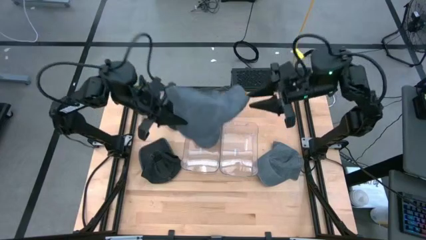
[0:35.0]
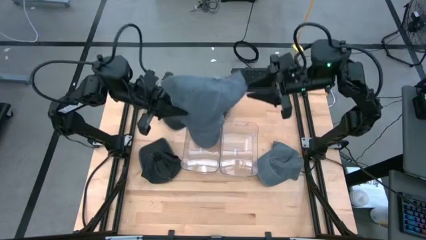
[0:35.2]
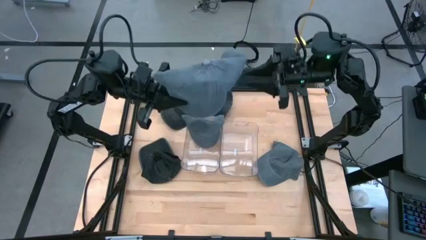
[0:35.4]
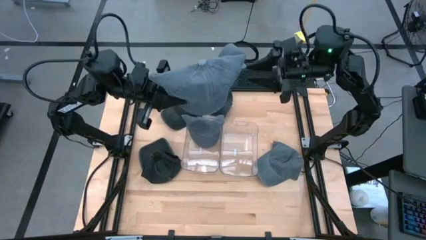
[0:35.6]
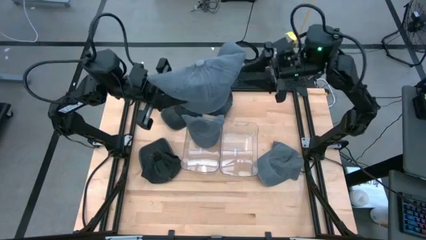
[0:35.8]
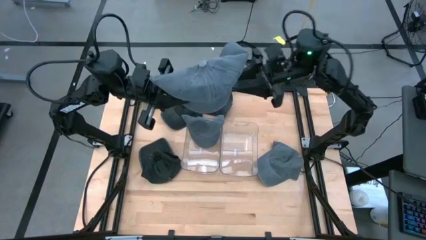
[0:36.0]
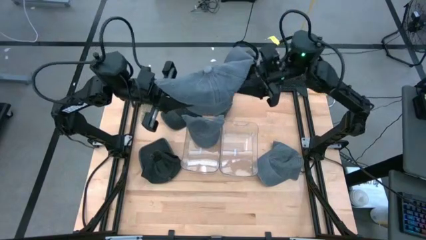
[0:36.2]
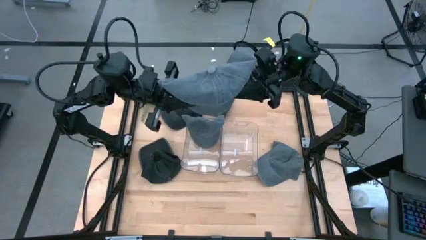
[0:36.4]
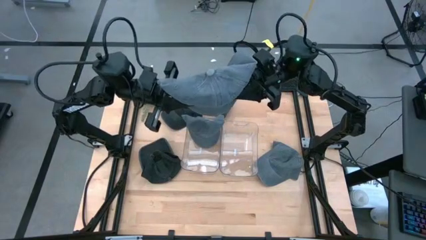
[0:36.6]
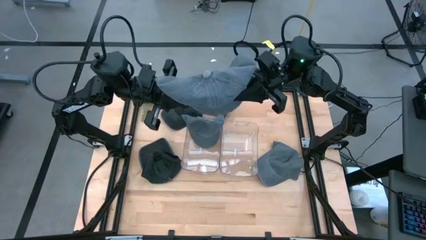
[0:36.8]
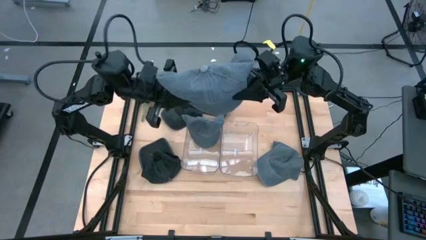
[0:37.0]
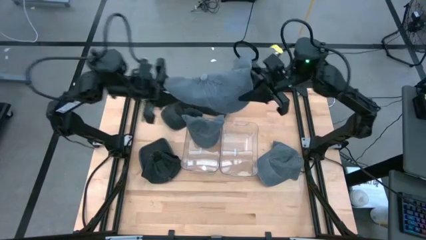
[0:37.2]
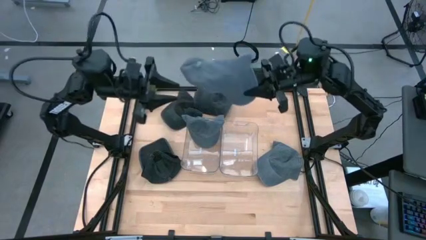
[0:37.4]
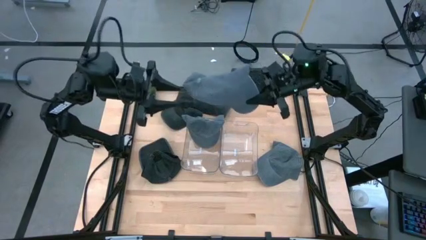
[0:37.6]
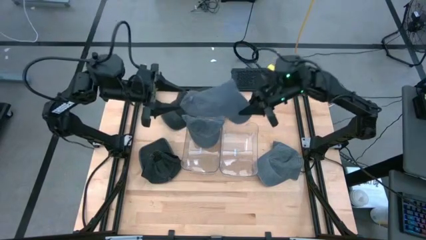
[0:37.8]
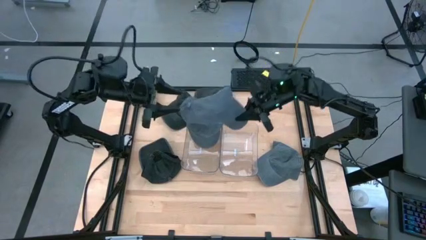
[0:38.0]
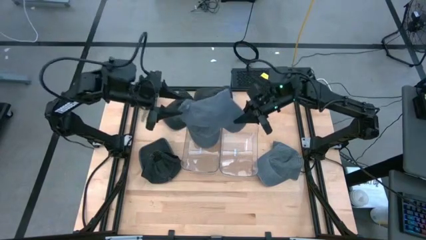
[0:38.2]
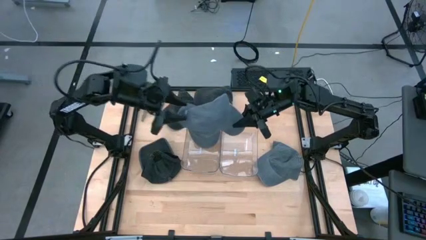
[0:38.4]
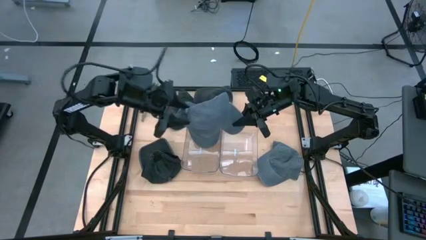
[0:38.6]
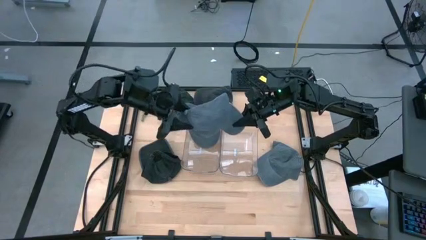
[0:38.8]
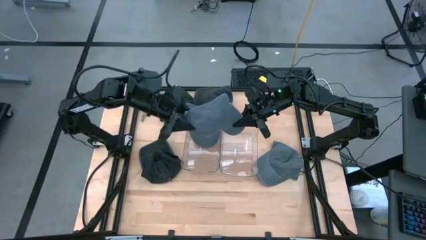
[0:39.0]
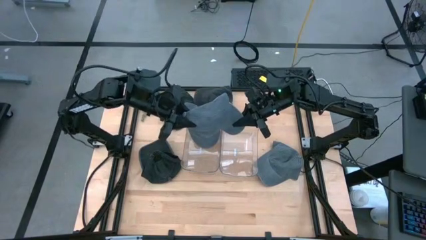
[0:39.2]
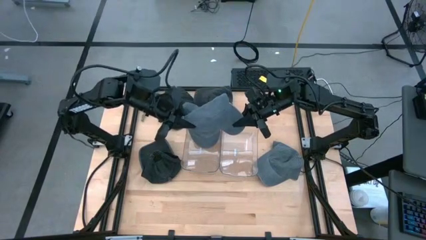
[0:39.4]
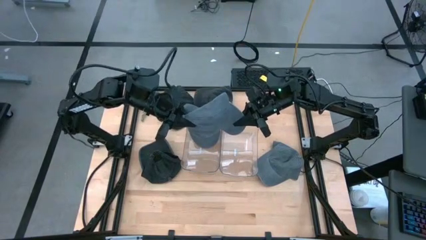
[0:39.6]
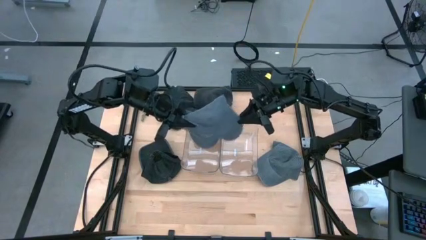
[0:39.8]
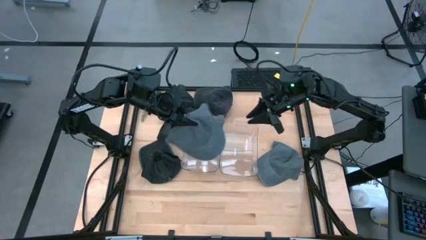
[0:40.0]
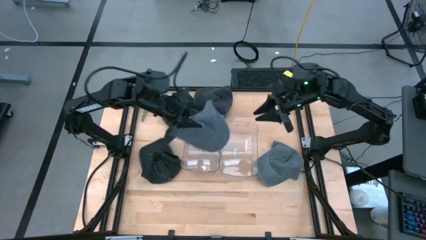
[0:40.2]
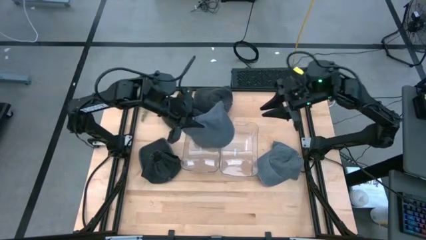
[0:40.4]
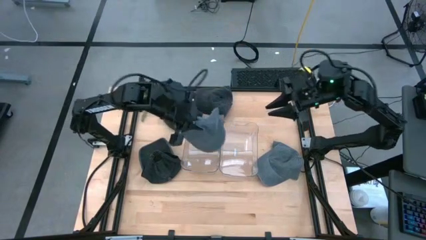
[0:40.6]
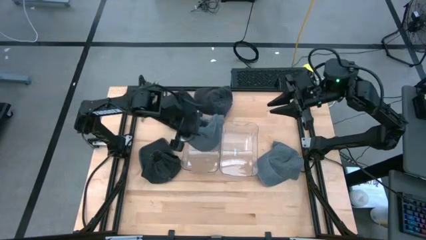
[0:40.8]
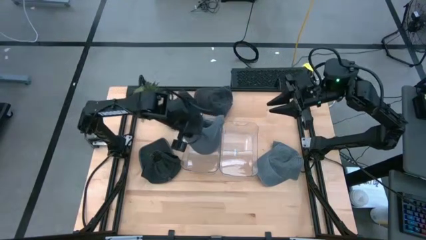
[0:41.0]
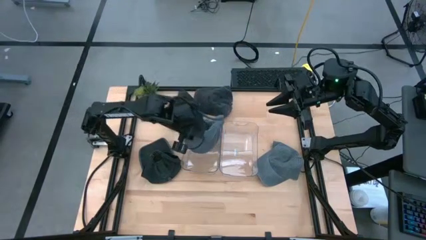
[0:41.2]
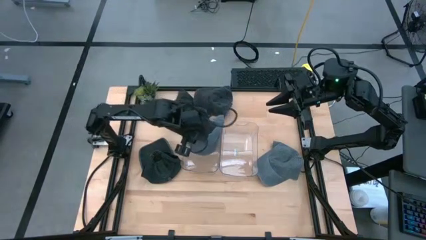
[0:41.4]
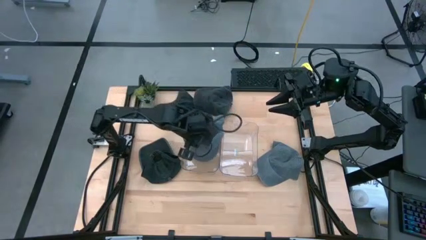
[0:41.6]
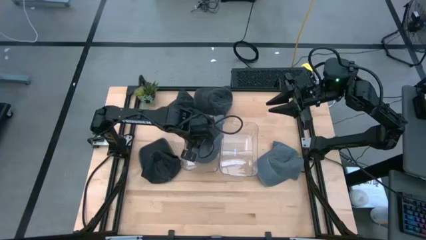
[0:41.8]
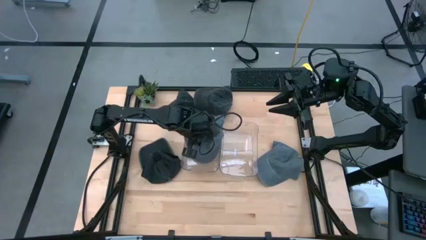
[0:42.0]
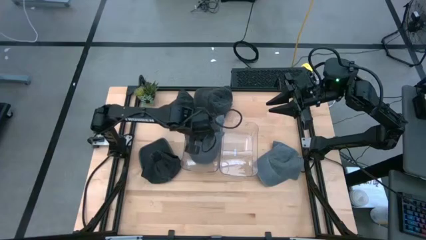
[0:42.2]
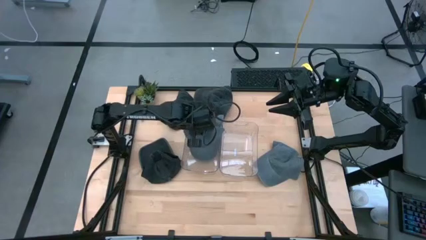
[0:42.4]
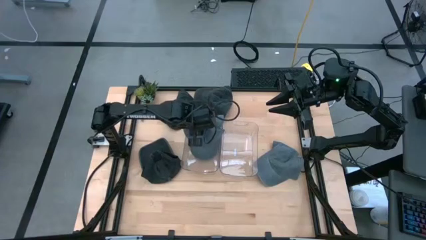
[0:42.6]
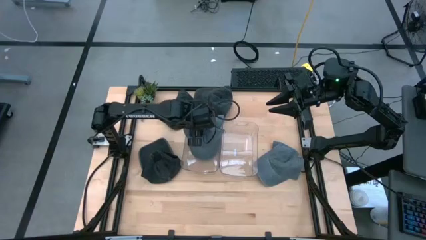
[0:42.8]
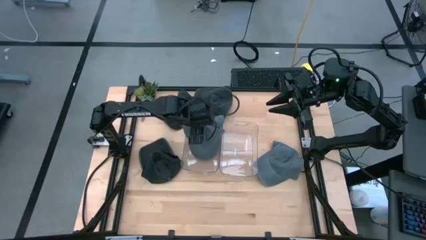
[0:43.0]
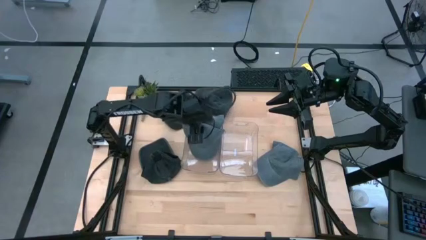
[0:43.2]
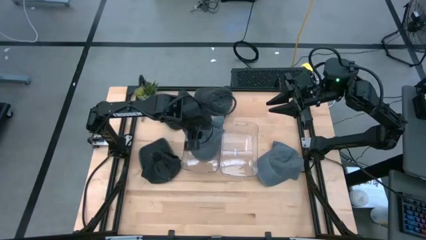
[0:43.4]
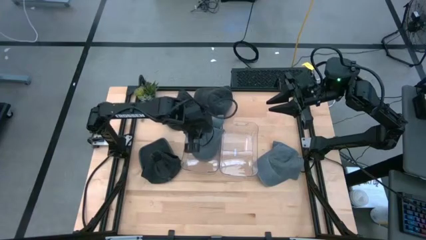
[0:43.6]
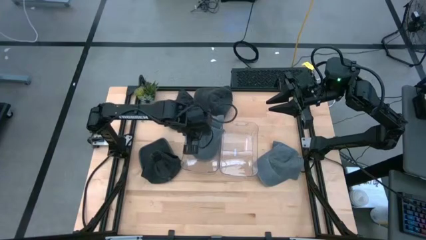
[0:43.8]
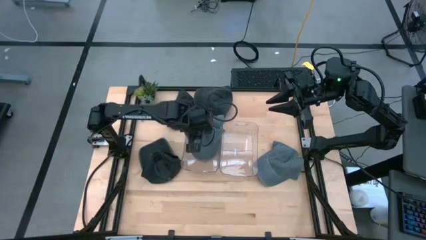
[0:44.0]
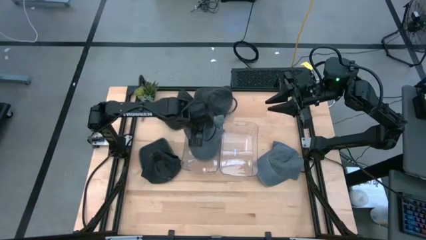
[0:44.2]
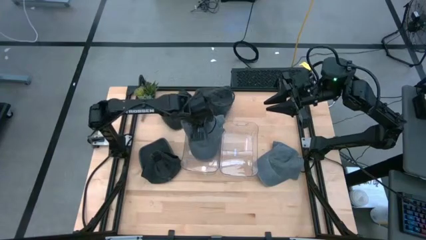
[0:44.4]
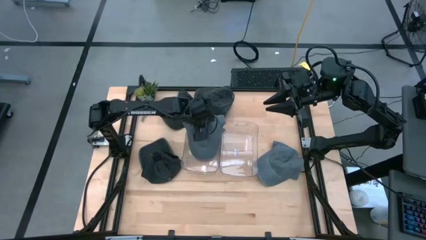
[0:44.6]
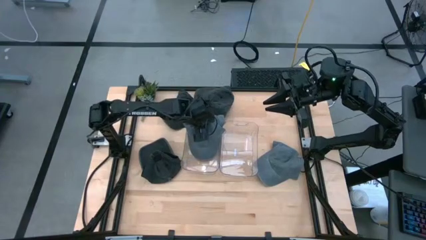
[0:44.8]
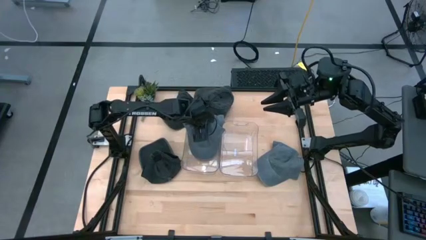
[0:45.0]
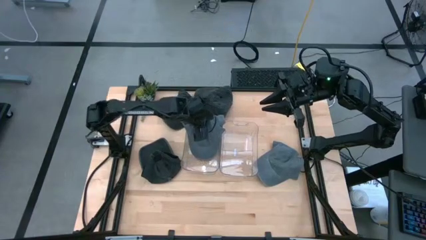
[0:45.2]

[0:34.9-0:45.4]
Task: Pick & Place hat
Put the bottom gray cap into the left transparent bin

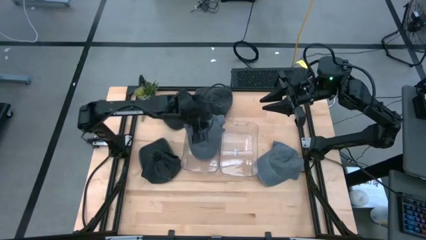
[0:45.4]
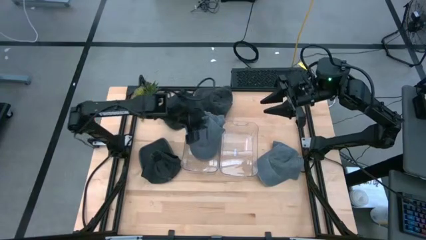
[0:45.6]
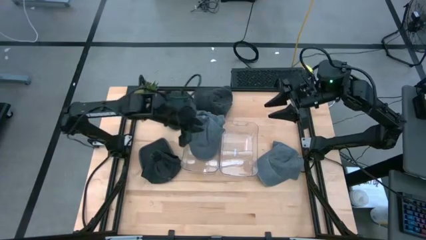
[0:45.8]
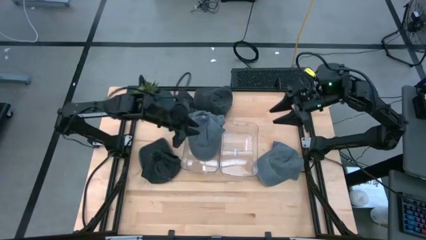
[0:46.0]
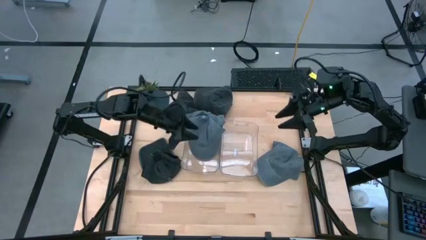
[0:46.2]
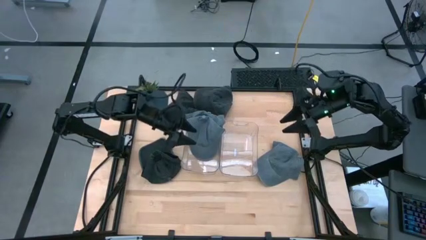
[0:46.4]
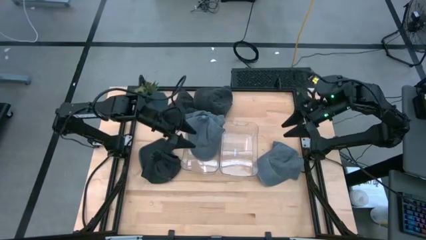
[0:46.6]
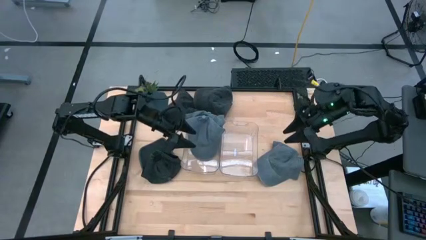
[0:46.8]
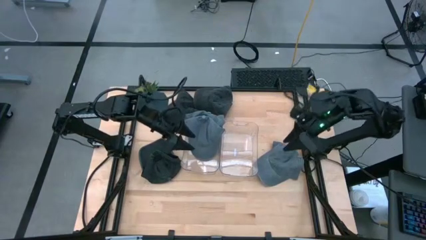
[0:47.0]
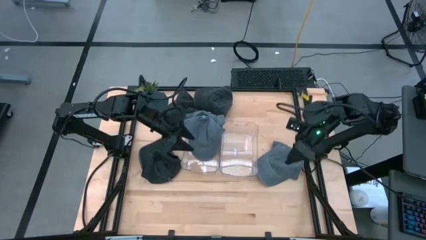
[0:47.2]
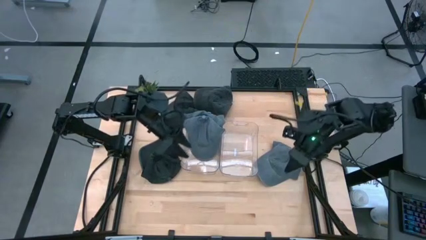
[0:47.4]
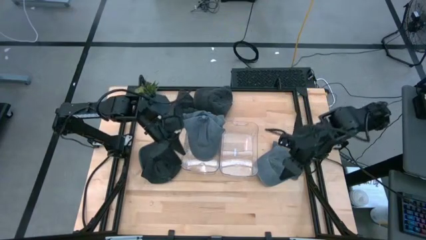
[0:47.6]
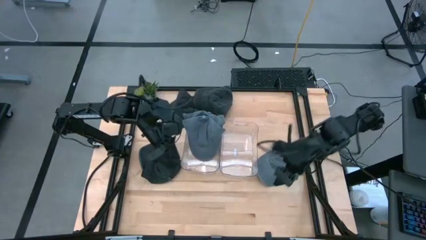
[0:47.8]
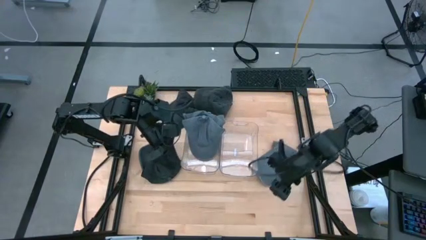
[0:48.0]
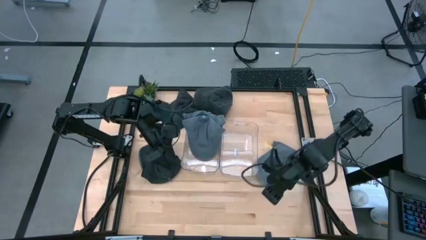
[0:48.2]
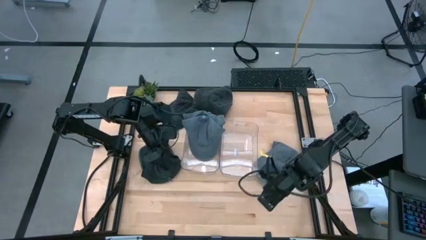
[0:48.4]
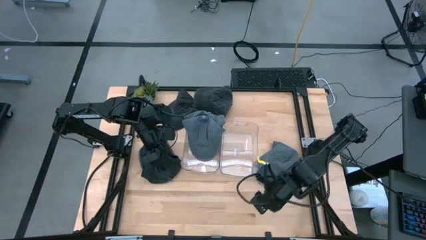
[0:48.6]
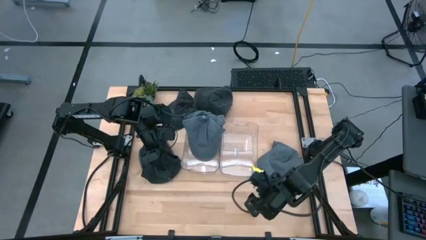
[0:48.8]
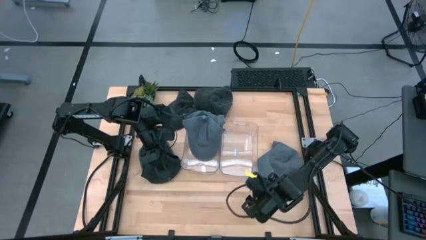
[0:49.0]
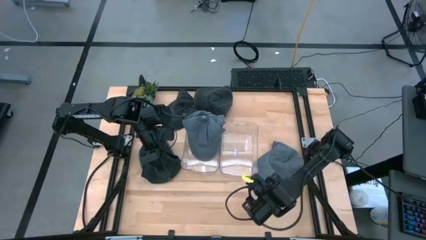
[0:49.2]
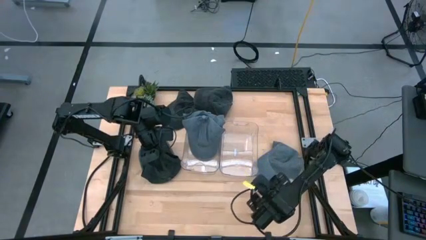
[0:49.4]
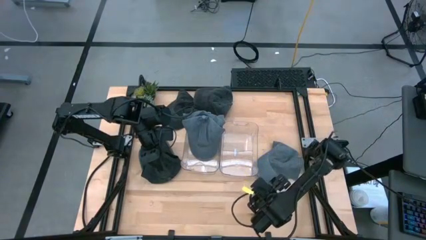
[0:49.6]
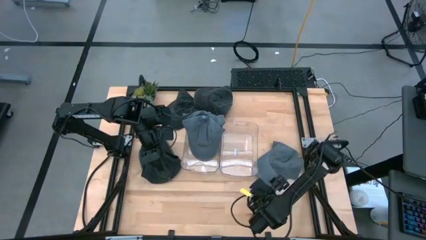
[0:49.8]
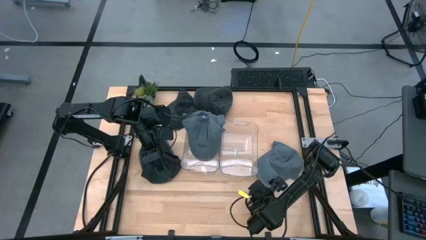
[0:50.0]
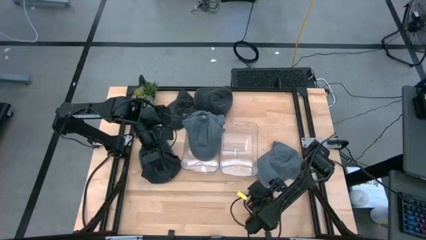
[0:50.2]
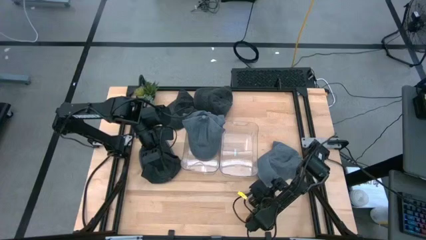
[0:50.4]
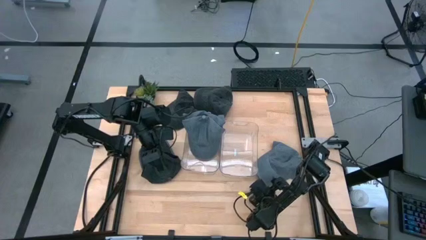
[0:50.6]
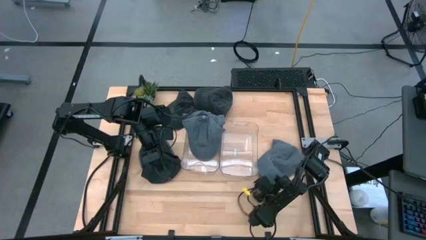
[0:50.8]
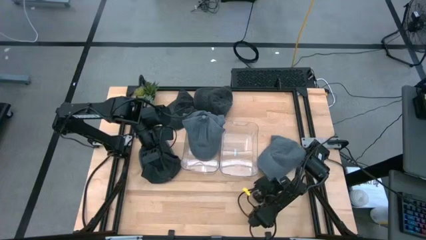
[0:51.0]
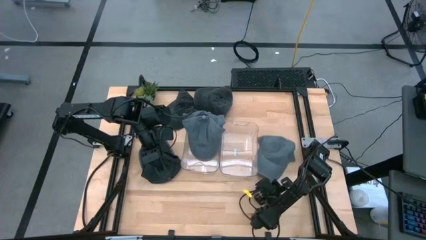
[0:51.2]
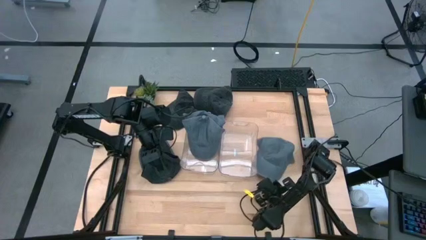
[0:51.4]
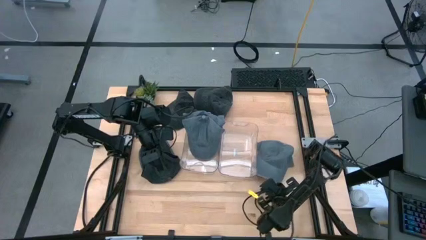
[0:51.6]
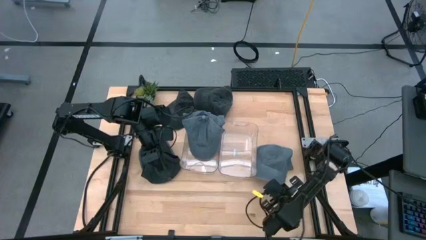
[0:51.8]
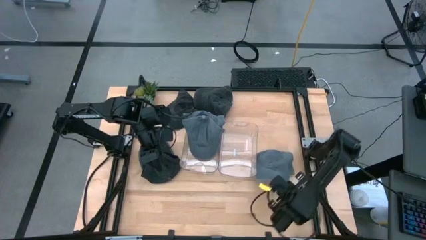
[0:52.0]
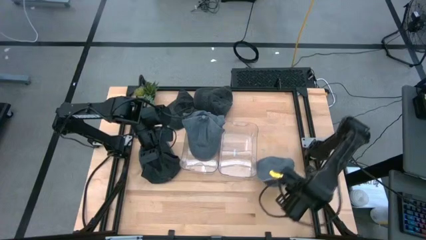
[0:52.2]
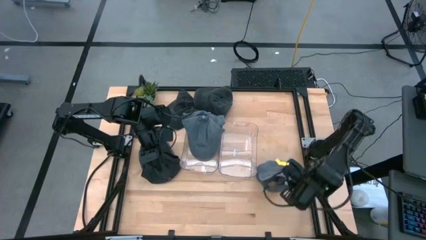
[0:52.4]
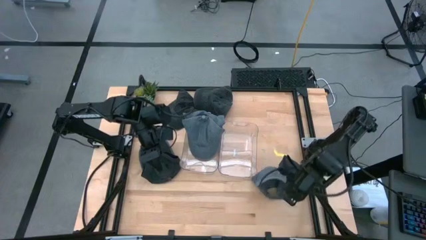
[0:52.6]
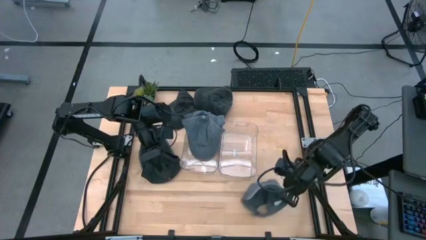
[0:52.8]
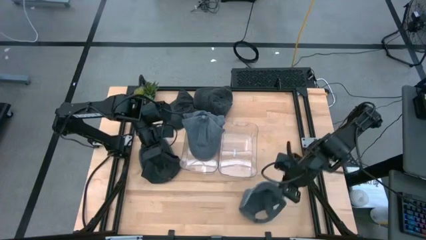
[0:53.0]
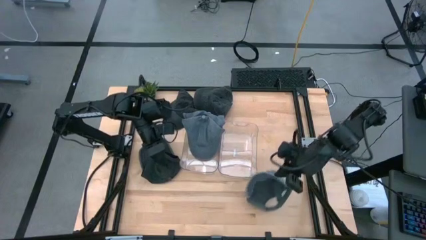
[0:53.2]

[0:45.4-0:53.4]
Put the gray cap into the left transparent bin
